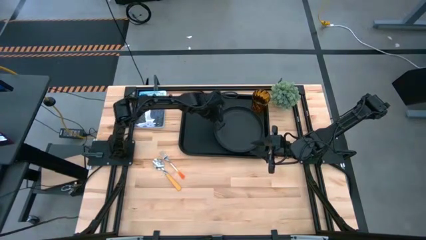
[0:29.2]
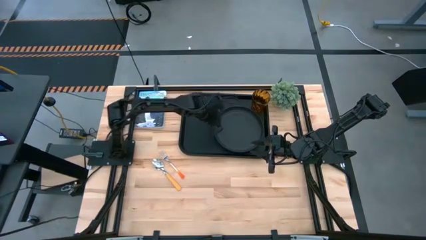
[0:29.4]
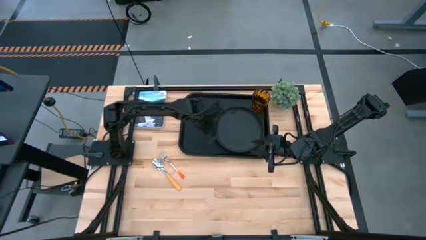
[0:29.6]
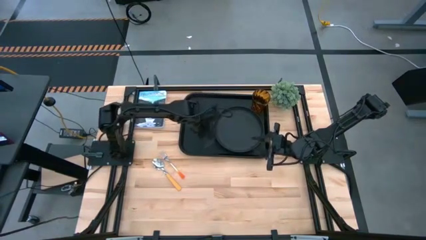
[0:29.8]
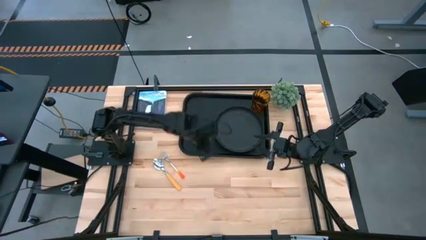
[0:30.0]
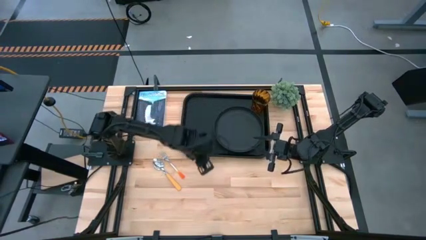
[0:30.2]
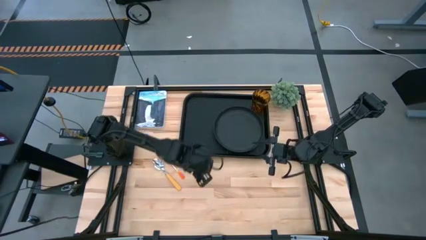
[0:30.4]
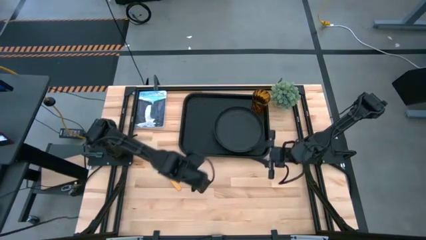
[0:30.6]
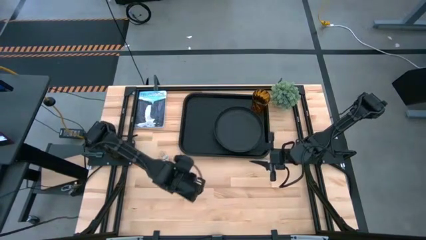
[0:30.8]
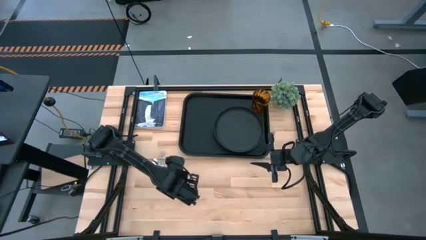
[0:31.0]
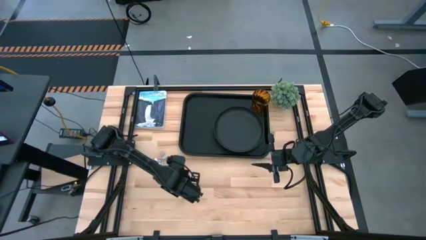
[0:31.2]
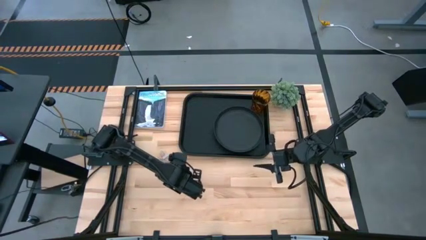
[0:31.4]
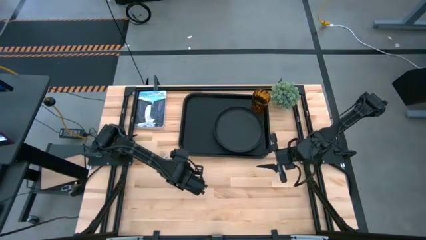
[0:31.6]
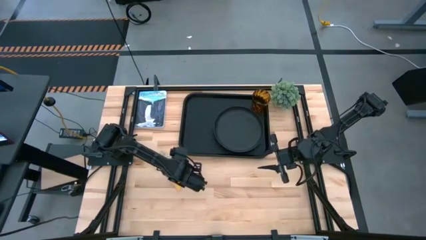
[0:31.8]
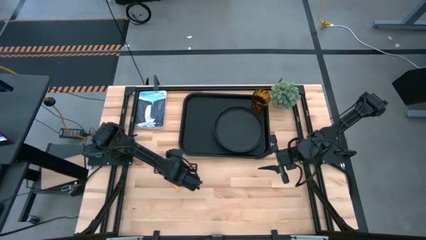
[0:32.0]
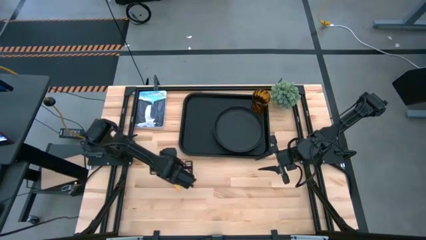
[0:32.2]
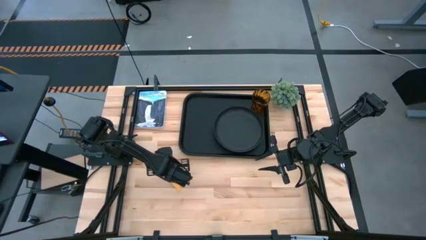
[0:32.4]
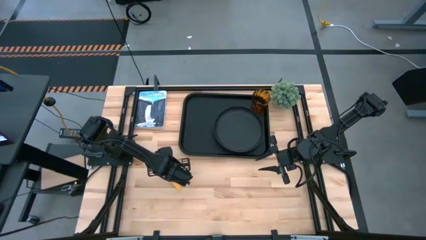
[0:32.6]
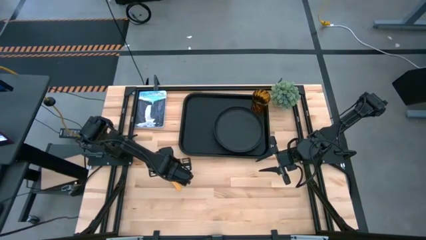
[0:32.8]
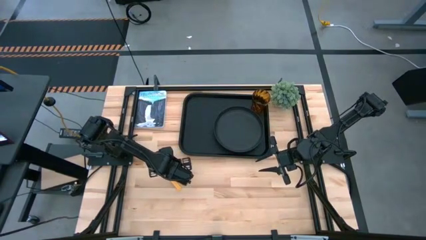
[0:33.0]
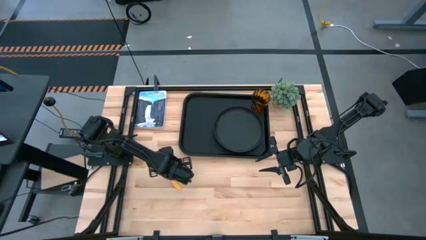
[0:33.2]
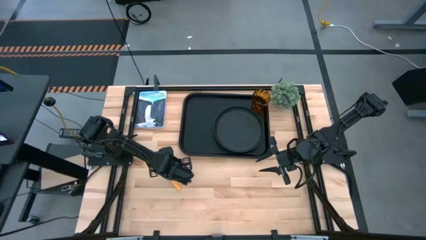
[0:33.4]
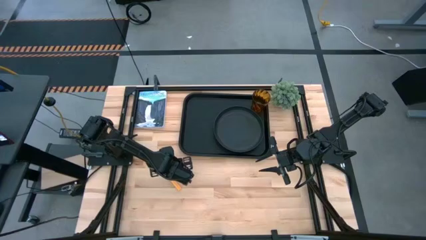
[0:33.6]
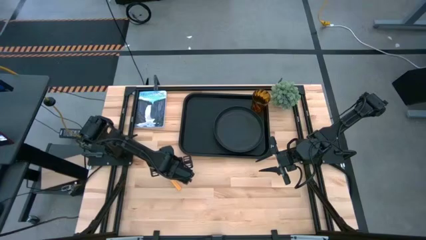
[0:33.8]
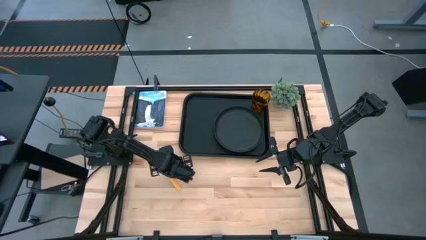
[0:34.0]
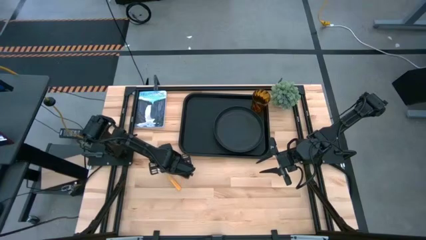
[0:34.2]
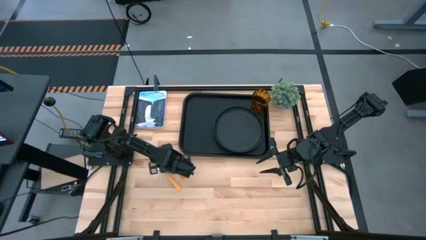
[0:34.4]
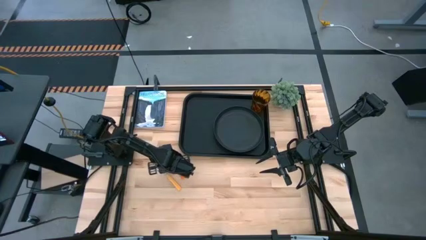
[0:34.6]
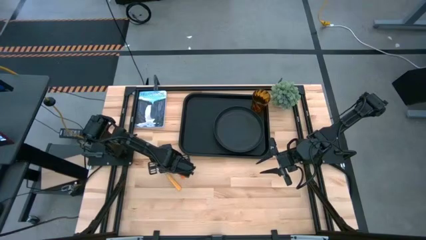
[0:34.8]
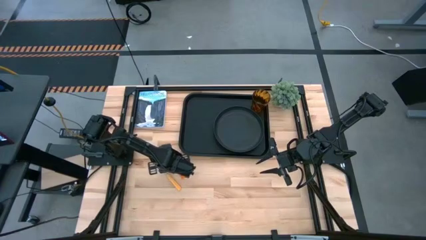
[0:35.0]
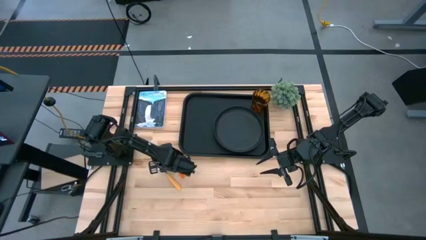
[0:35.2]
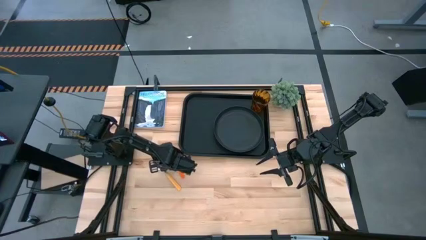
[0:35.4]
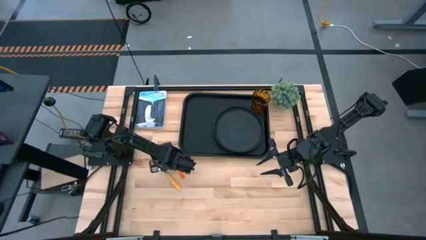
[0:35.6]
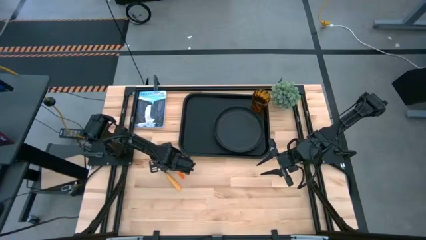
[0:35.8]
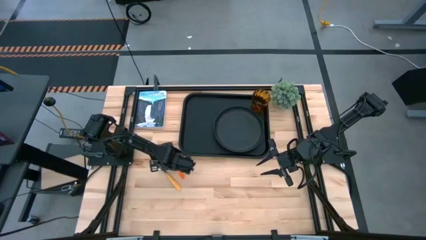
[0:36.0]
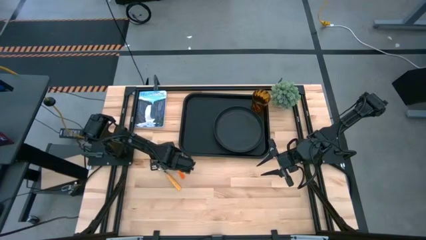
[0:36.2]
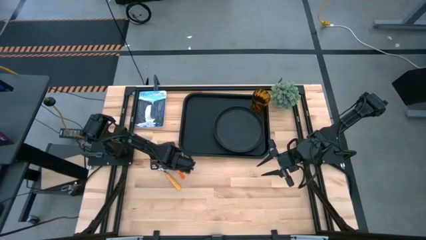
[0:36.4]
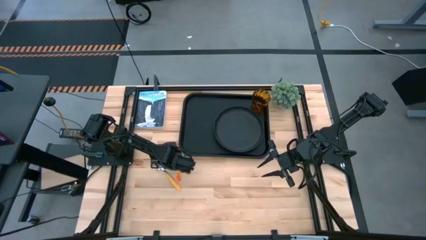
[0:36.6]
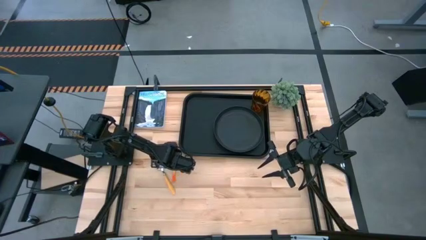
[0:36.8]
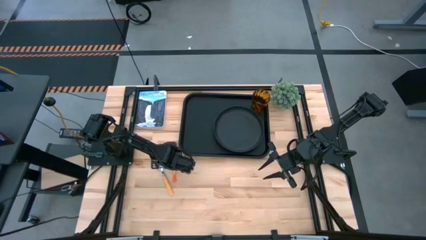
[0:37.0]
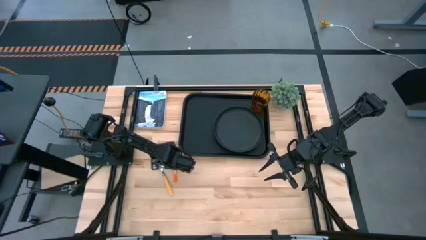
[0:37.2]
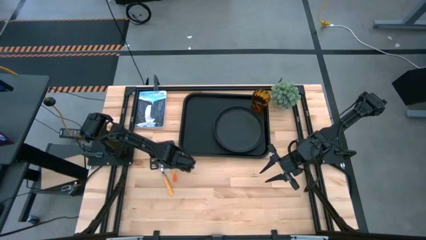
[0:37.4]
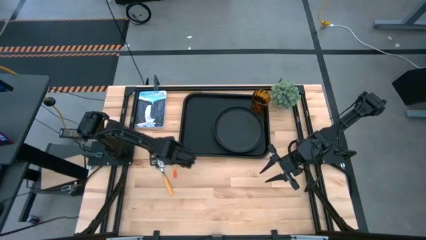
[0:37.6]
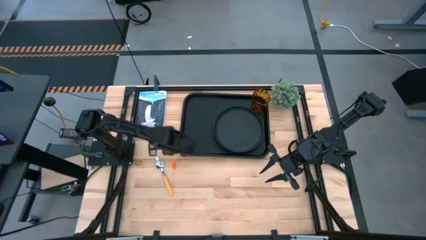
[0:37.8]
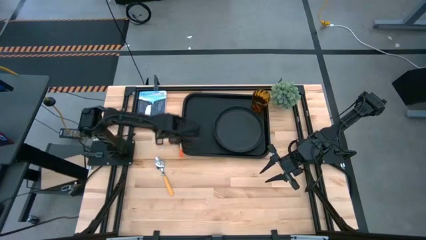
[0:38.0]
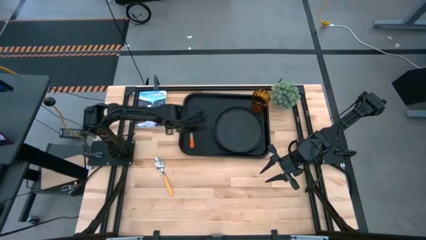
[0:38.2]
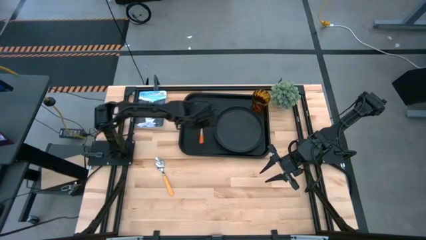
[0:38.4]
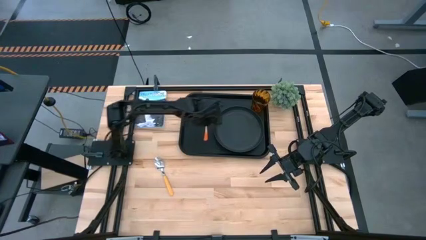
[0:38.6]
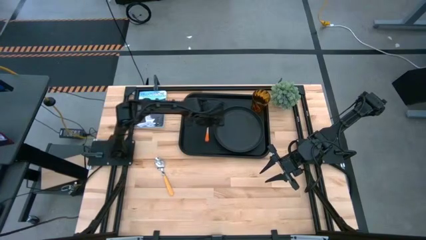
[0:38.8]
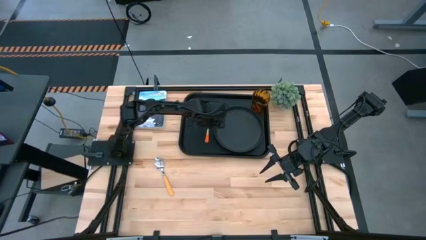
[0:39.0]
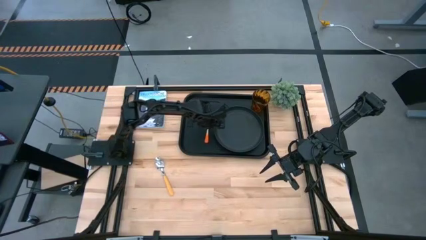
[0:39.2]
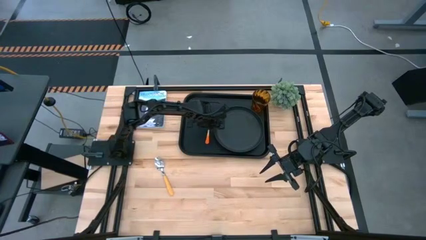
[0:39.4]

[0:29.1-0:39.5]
Task: Pick and place plate/cup/fork/spoon on tray
Put the orange fork on the black serving tray to the left of the black plate

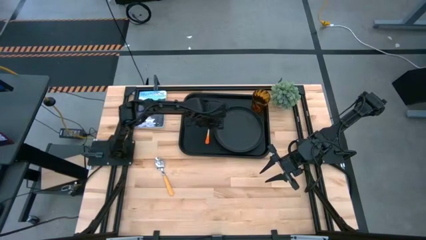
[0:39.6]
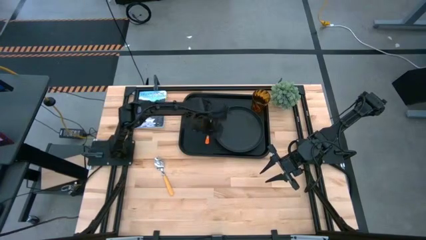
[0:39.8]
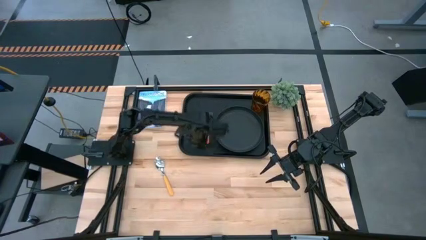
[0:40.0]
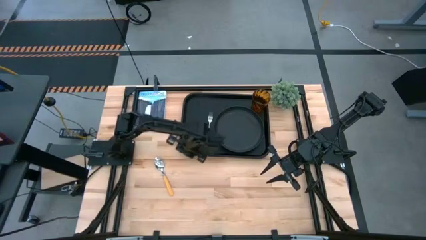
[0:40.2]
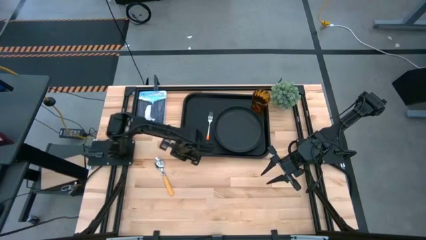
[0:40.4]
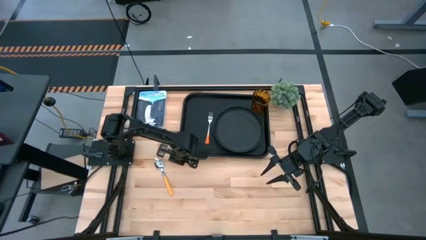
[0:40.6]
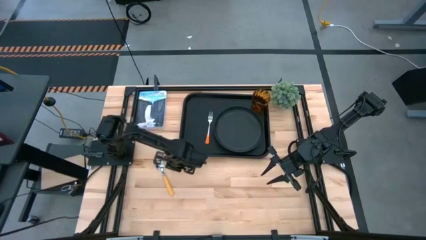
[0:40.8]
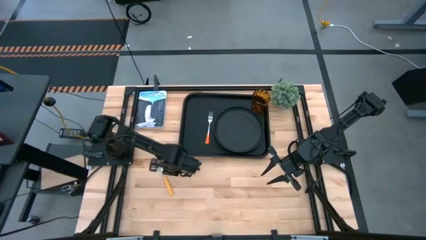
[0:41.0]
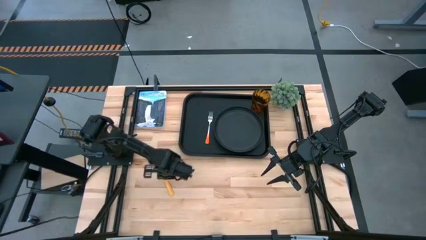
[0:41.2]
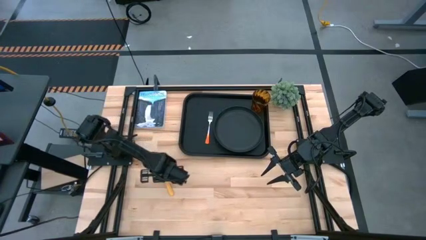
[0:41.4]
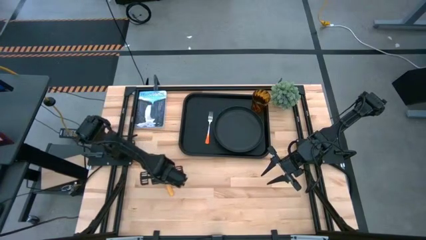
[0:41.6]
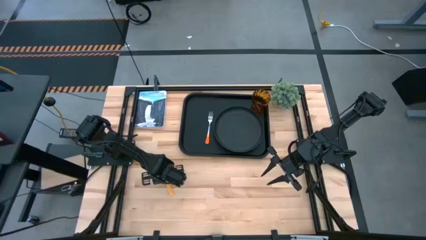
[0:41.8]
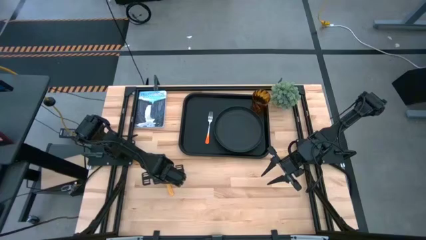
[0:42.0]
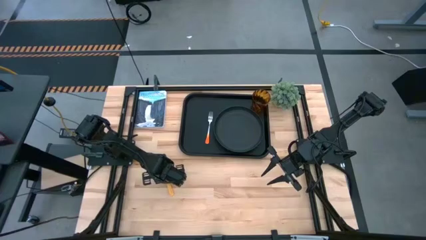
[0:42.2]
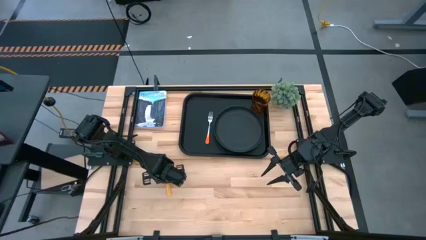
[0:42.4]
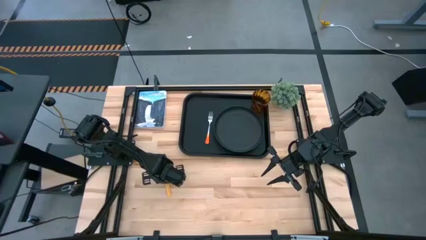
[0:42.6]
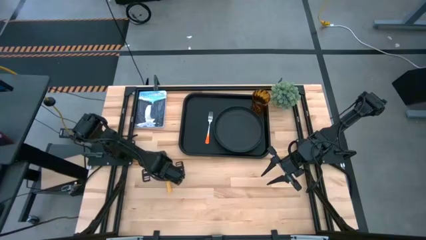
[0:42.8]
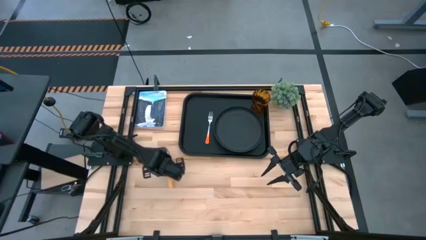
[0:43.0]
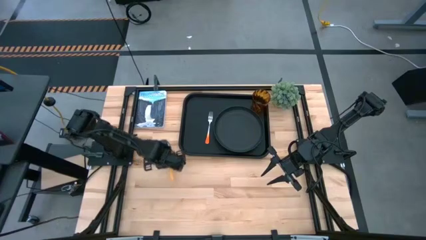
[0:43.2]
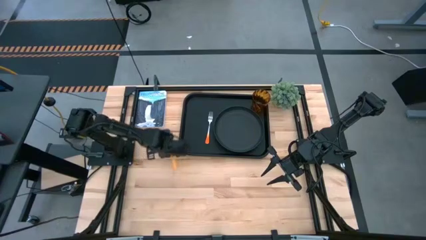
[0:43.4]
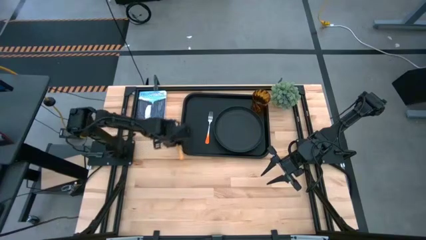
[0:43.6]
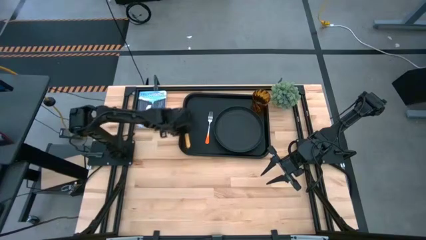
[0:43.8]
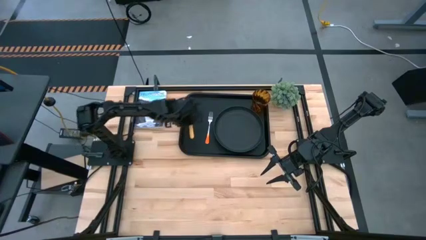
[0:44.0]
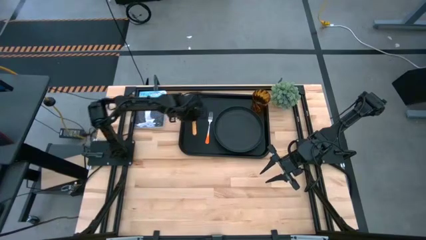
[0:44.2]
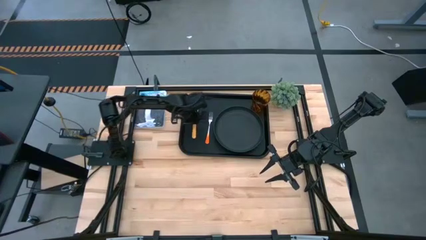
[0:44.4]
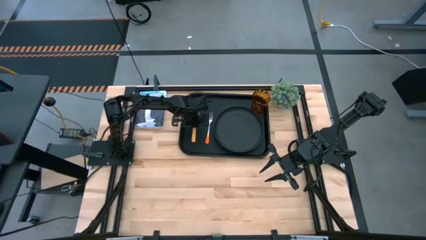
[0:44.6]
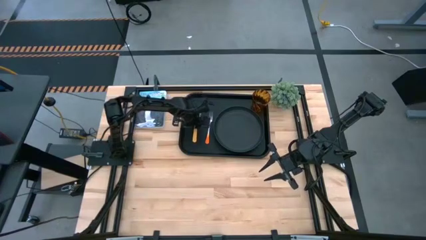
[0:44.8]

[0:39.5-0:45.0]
Put the yellow spoon on the black serving tray right beside the orange fork
